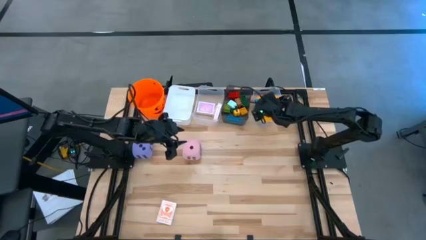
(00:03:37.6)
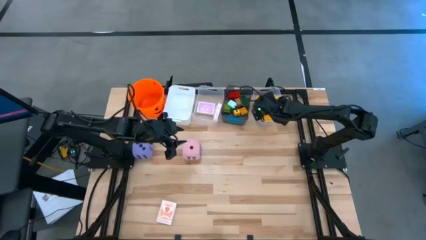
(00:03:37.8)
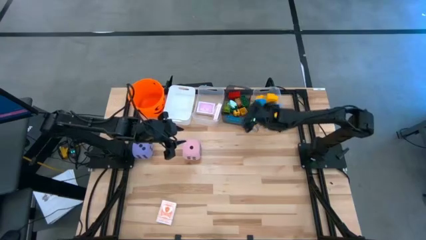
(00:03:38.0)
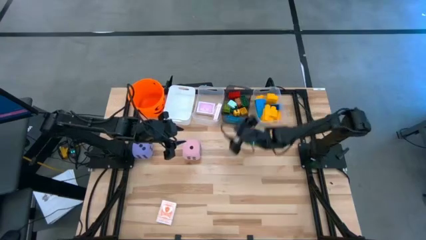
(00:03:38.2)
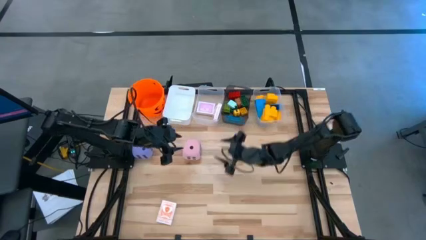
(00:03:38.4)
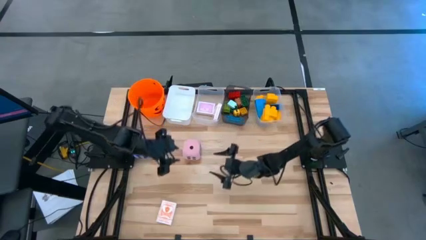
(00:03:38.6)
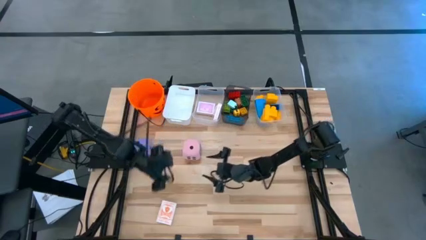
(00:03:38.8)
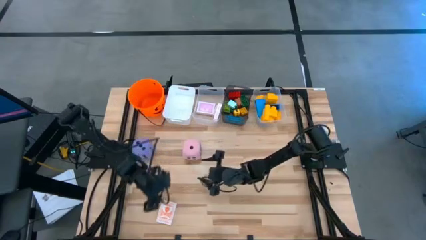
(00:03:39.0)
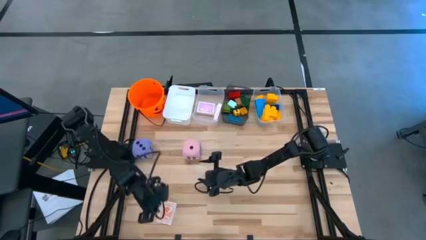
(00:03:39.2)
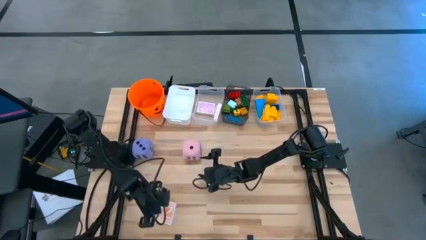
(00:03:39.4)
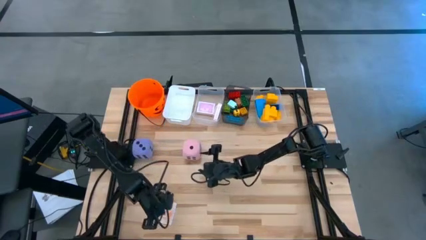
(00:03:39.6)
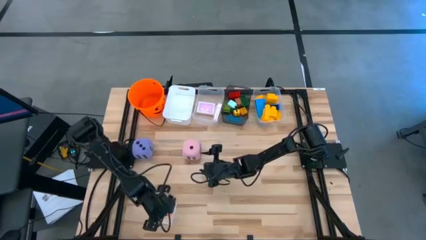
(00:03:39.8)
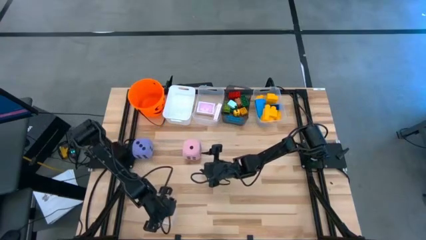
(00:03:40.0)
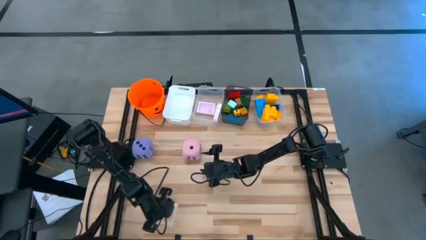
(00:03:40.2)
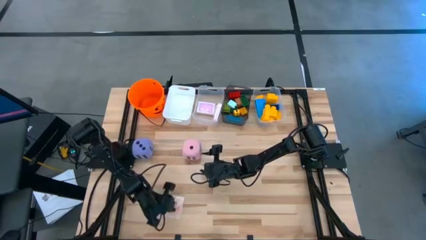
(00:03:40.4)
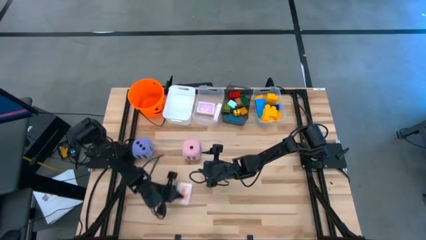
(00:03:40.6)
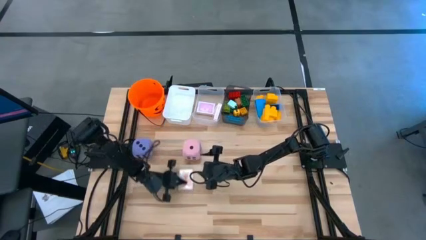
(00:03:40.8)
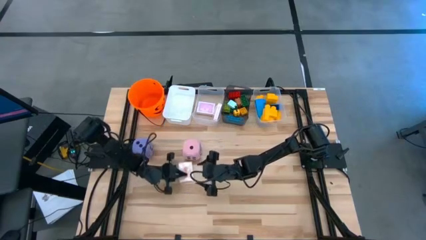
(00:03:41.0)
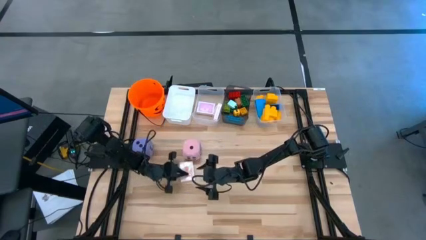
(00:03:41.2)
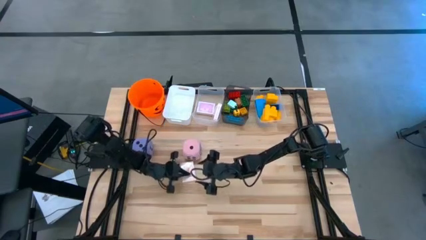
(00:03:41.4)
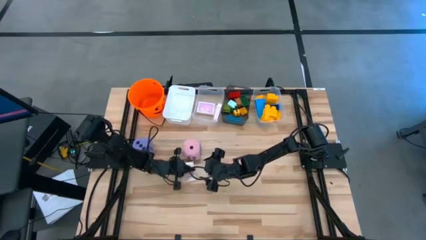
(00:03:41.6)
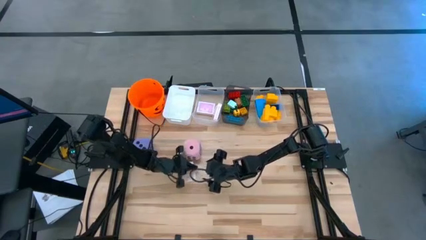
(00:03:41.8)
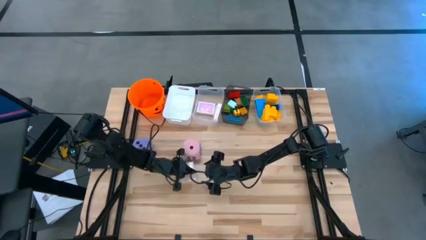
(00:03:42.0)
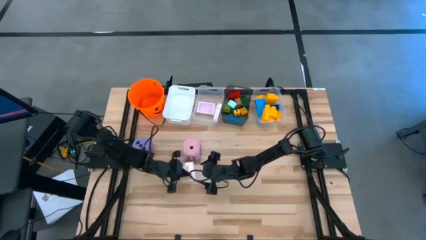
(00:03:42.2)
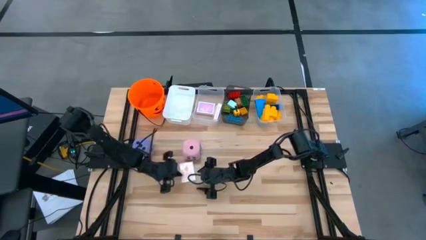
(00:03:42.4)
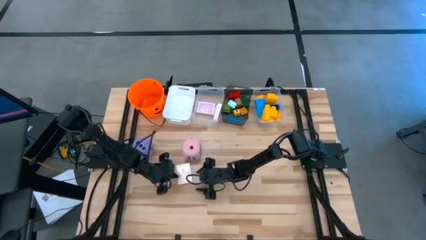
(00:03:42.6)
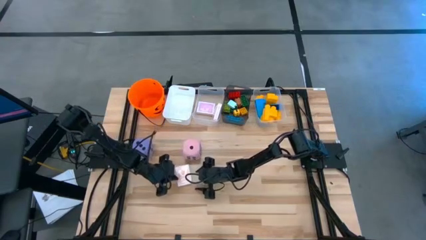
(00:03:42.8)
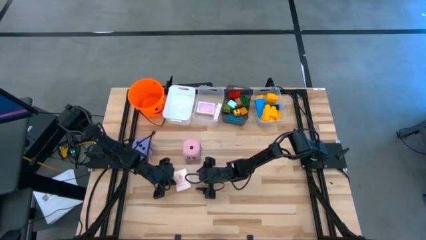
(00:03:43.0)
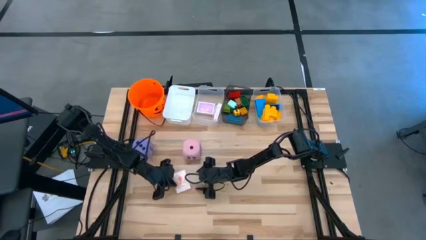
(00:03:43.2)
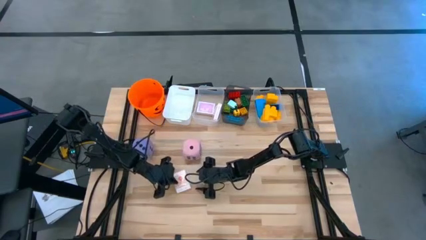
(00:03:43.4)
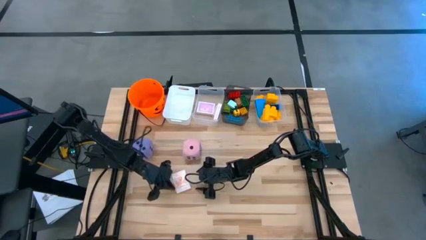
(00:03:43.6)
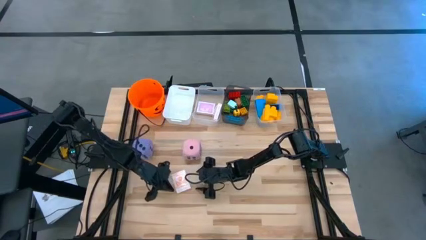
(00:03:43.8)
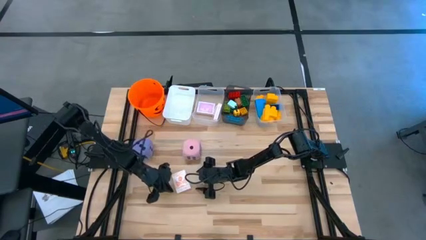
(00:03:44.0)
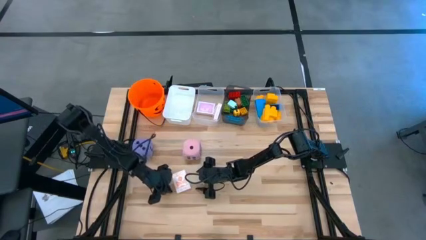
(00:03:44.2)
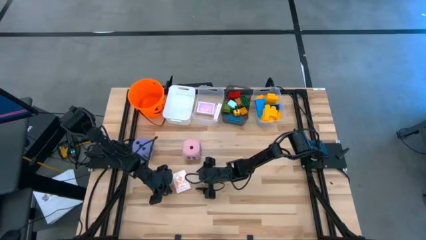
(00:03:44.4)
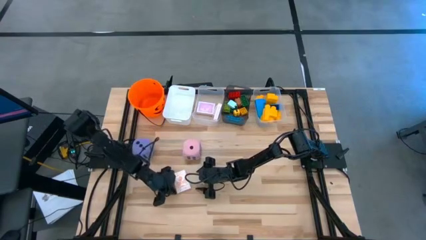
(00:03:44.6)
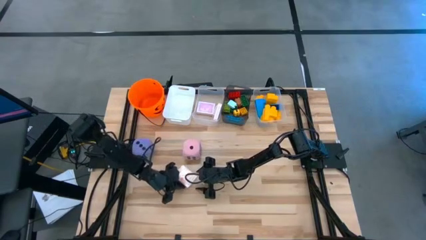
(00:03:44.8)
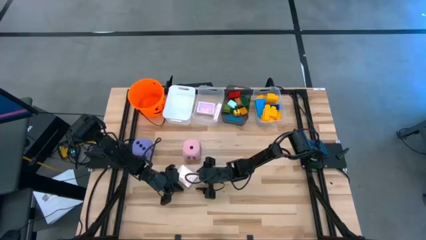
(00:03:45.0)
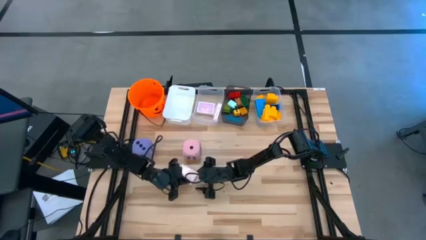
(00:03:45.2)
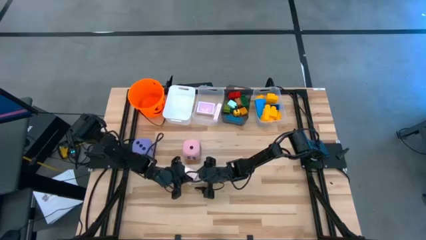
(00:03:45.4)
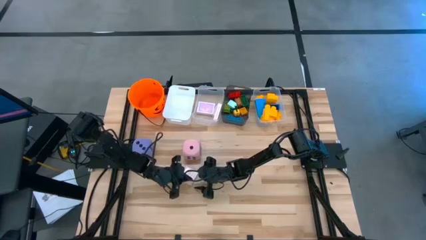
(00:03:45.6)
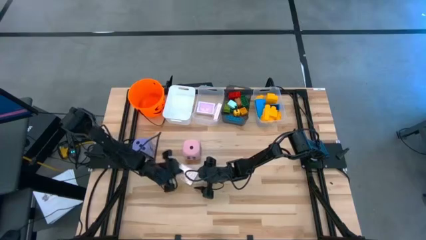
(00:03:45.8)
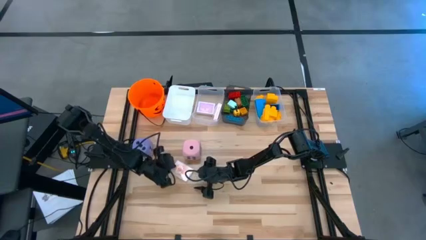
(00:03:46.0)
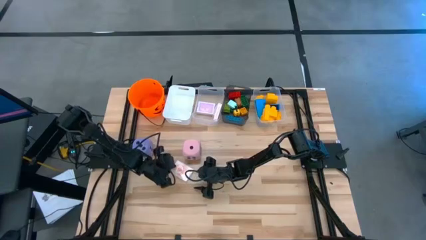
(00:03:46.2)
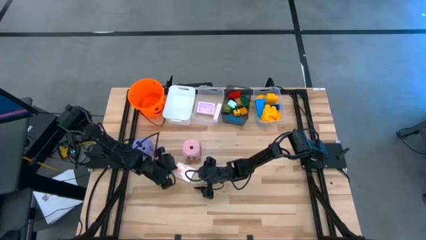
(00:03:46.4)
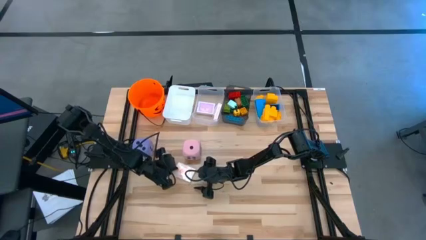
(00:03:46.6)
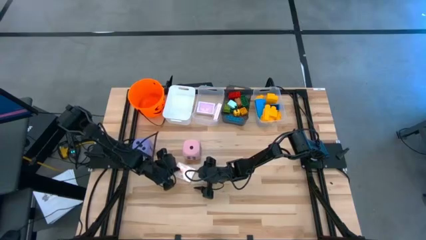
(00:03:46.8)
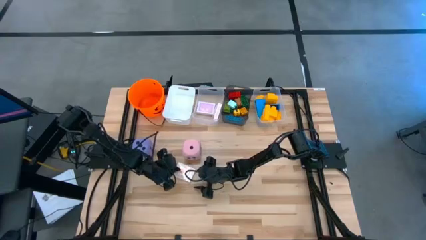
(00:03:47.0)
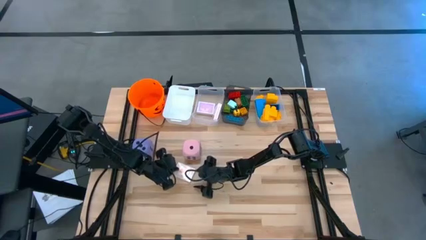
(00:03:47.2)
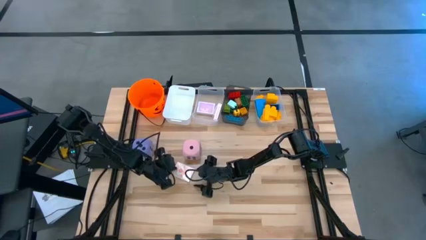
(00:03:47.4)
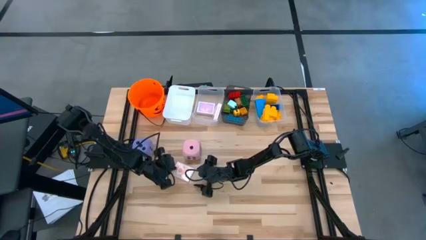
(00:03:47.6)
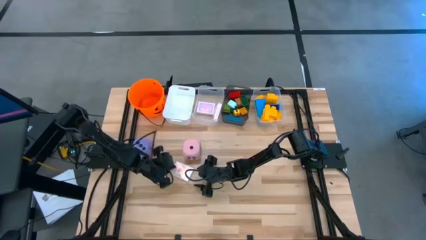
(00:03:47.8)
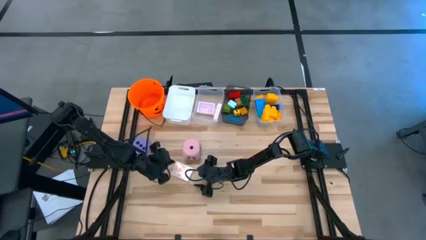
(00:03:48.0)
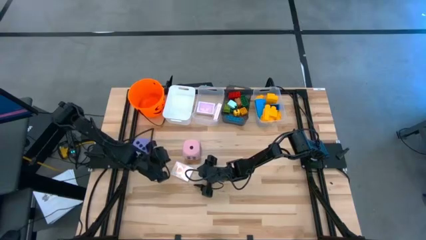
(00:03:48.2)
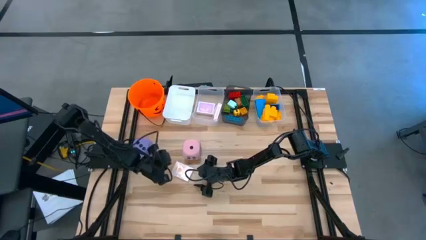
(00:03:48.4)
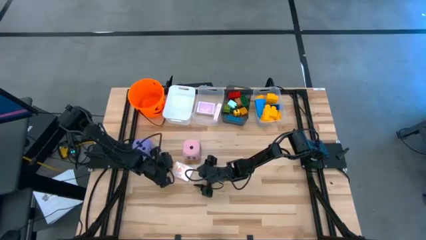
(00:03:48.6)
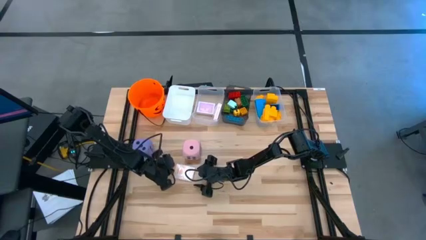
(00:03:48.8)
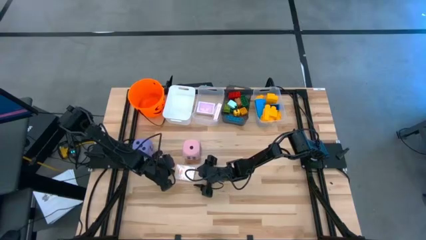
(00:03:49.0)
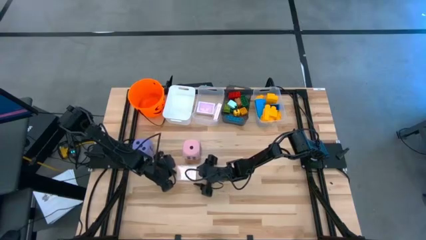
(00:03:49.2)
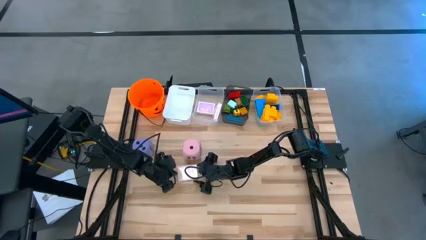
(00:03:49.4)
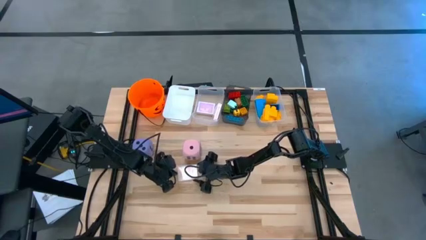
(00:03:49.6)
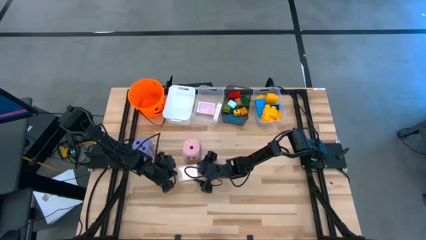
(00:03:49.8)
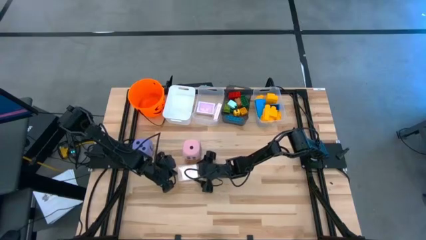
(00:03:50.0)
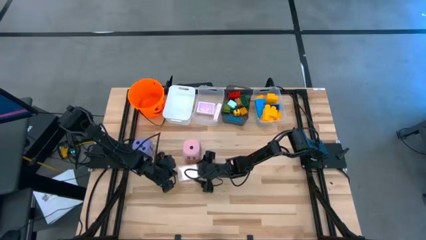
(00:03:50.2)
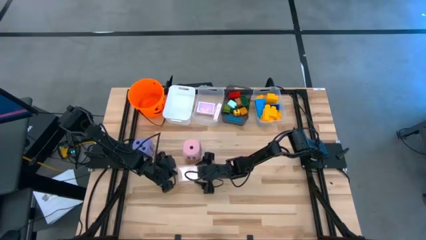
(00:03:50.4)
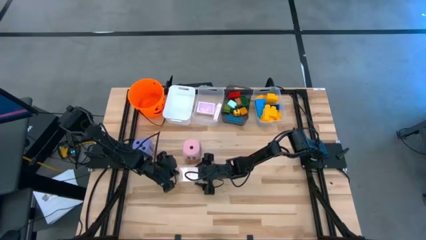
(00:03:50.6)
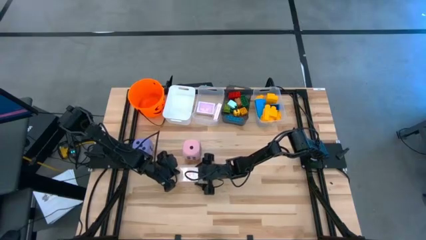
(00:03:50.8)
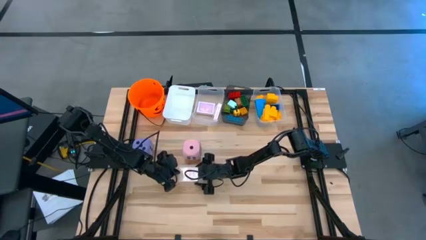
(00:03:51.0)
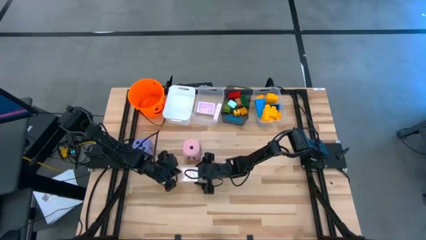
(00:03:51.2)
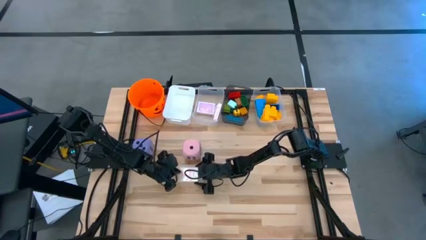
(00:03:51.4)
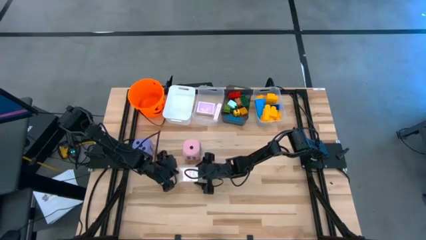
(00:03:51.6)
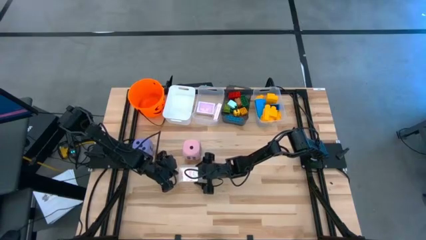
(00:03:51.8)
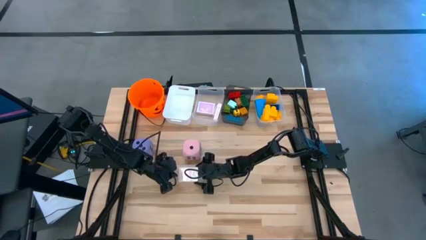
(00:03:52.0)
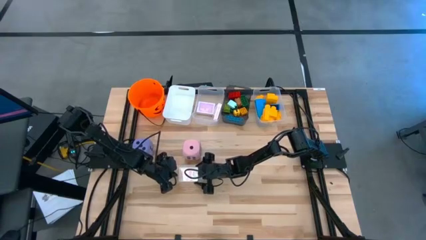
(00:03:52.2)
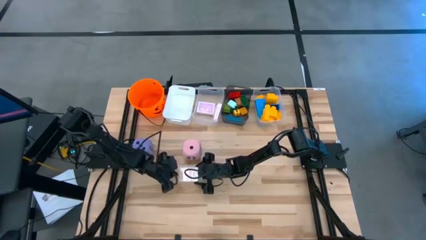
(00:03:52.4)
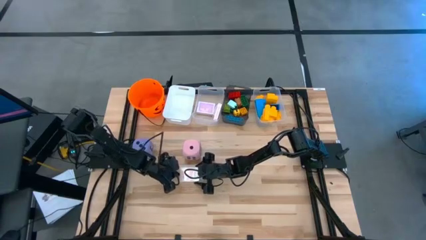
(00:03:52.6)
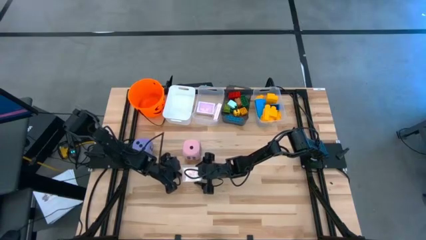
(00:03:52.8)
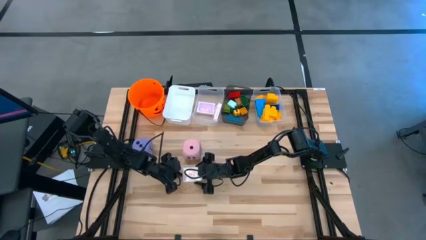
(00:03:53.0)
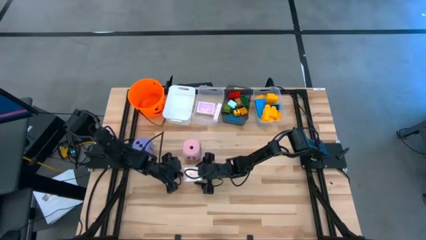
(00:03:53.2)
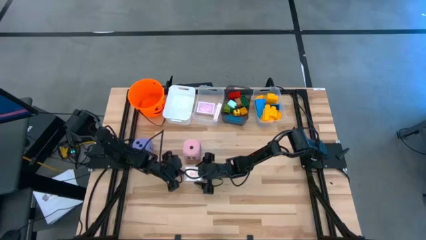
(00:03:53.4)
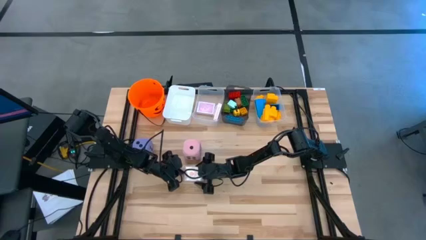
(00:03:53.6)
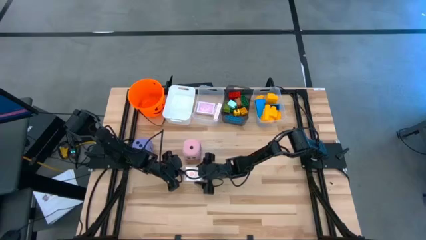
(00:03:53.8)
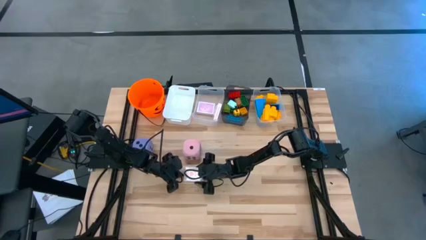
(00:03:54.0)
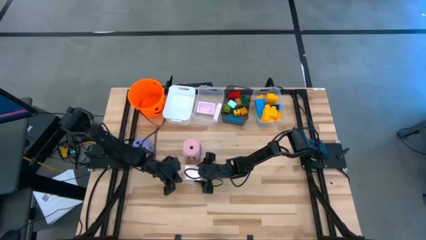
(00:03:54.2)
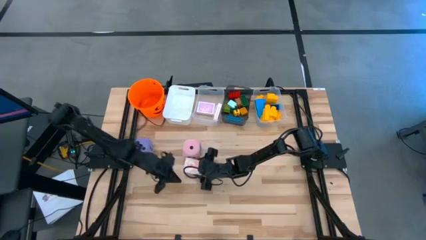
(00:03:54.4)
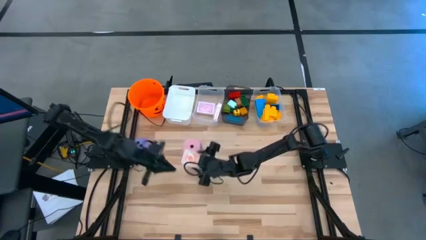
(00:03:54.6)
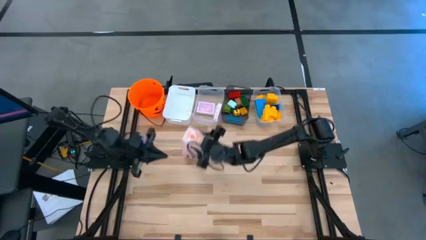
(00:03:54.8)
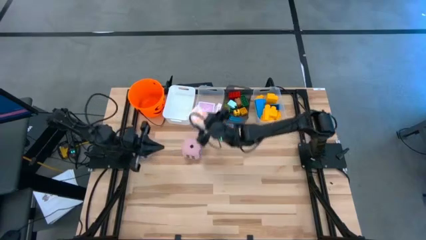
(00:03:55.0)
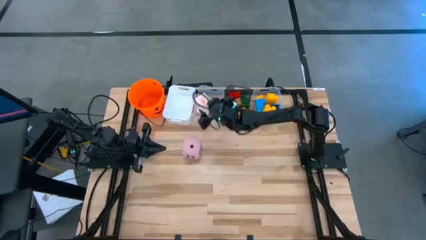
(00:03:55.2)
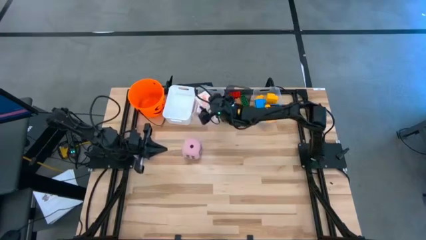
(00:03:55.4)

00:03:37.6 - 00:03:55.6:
Task: Pick & Place Toys
Put the orange game card into the left transparent bin
